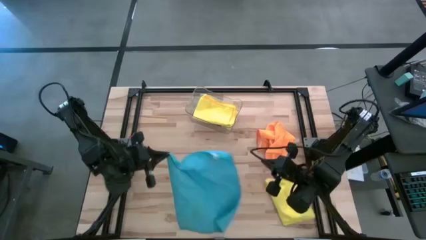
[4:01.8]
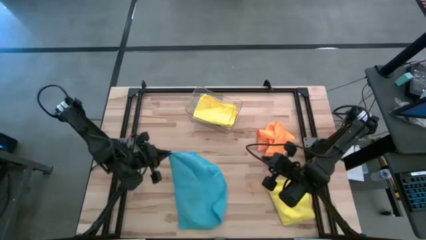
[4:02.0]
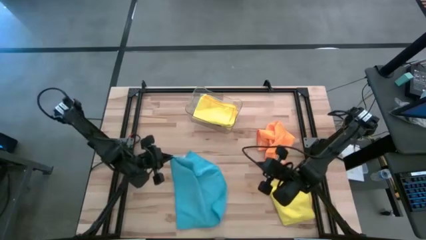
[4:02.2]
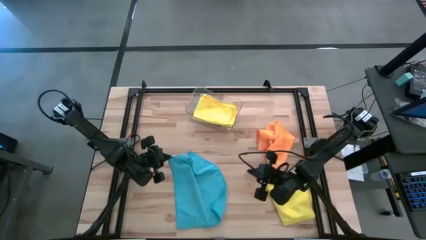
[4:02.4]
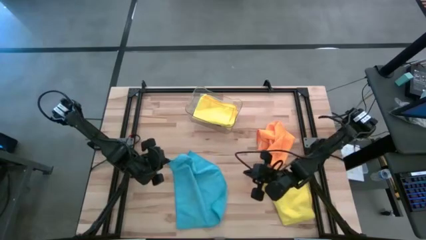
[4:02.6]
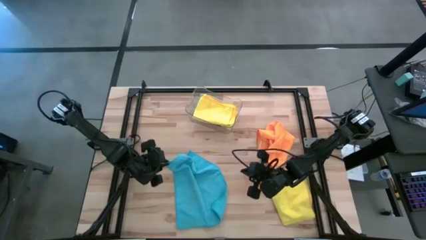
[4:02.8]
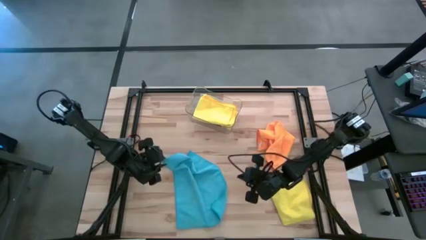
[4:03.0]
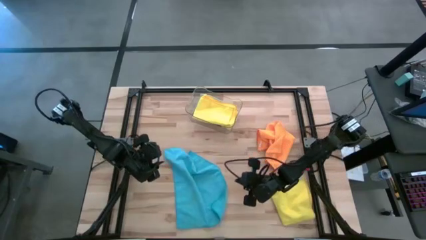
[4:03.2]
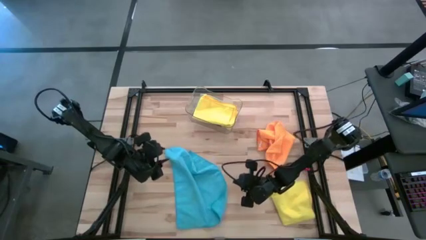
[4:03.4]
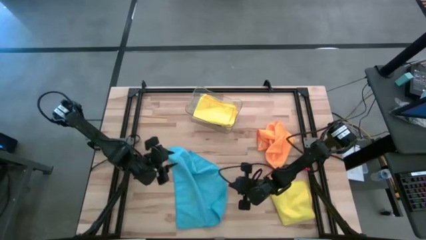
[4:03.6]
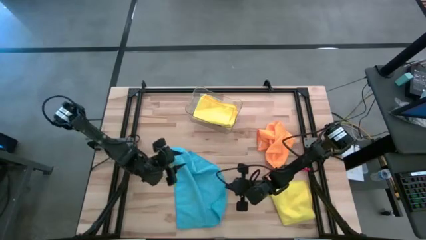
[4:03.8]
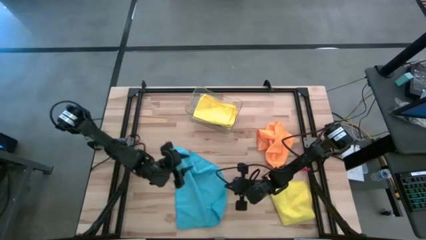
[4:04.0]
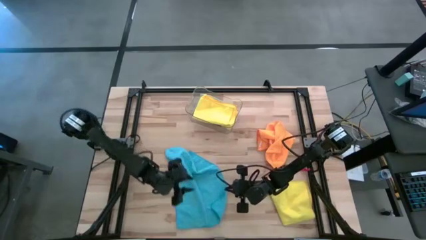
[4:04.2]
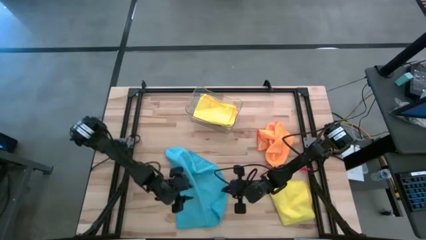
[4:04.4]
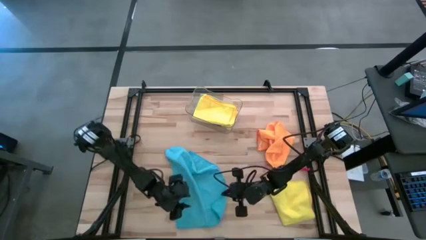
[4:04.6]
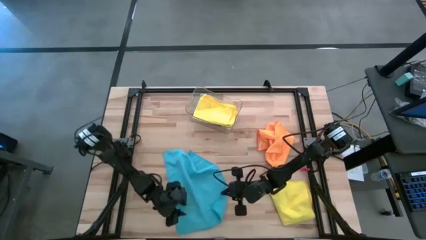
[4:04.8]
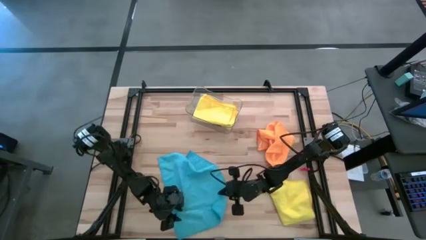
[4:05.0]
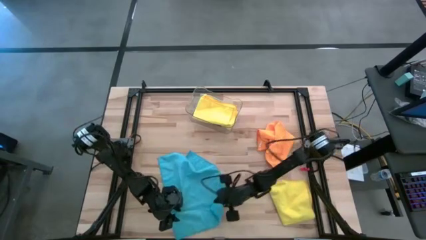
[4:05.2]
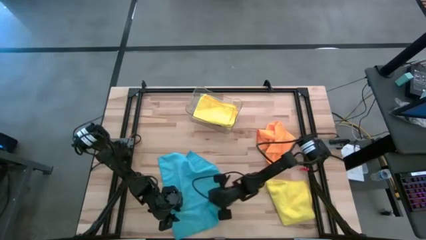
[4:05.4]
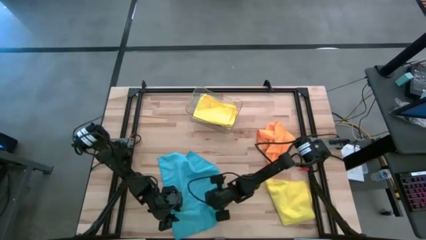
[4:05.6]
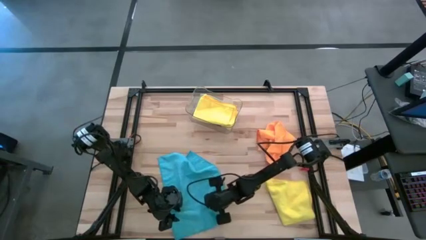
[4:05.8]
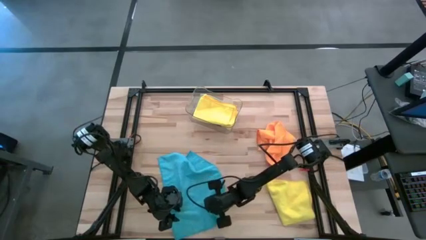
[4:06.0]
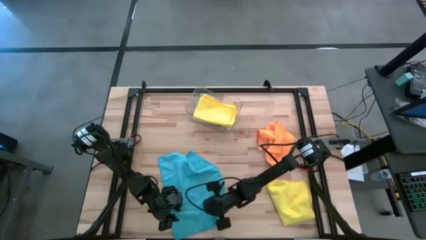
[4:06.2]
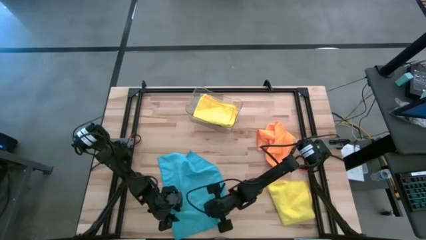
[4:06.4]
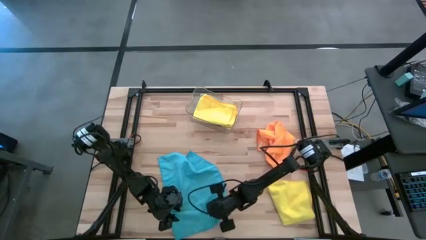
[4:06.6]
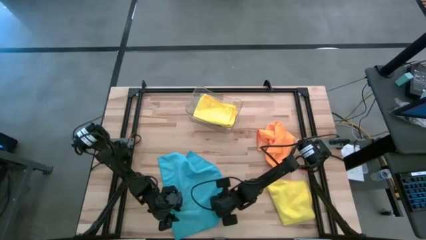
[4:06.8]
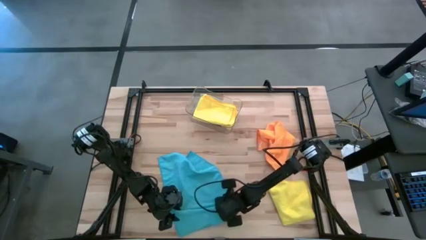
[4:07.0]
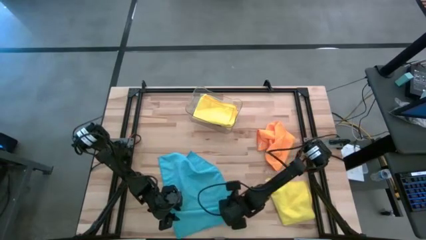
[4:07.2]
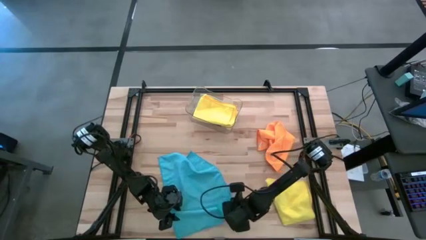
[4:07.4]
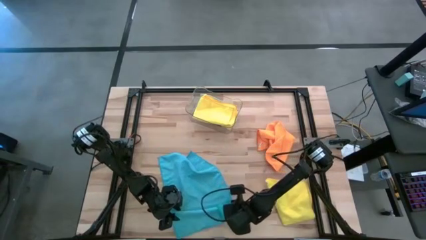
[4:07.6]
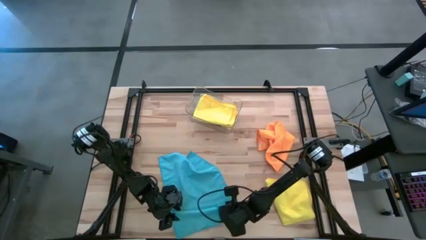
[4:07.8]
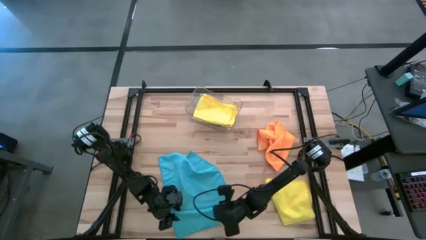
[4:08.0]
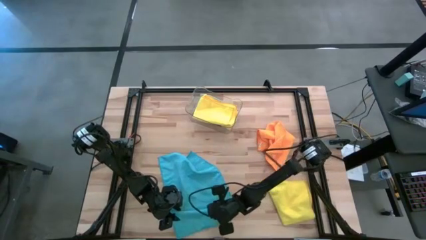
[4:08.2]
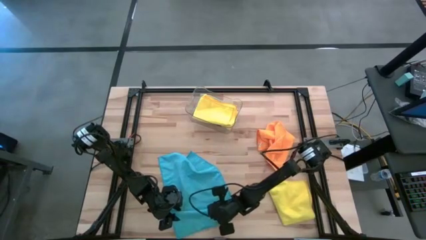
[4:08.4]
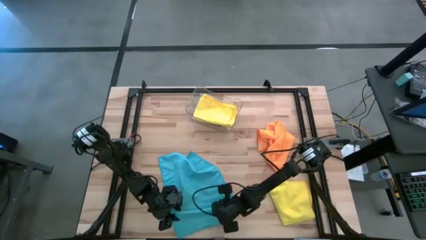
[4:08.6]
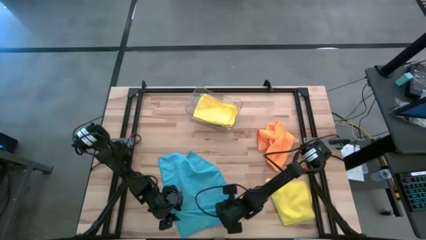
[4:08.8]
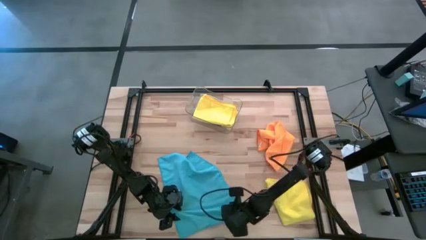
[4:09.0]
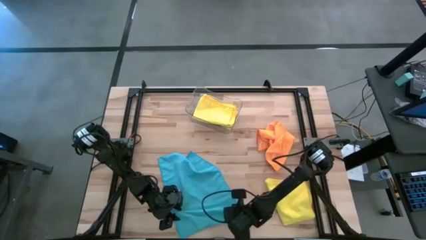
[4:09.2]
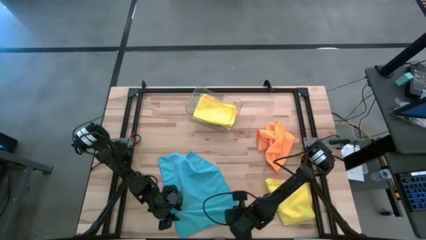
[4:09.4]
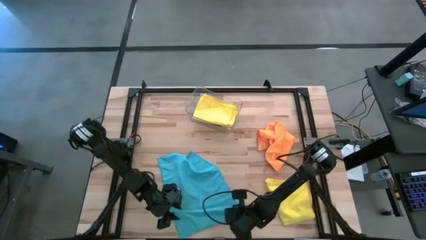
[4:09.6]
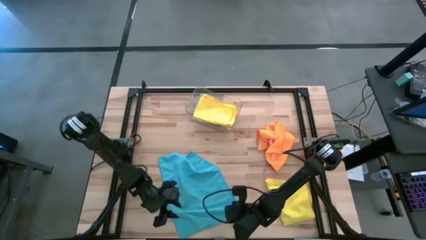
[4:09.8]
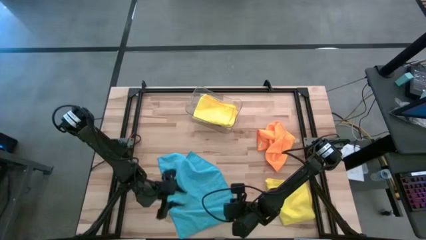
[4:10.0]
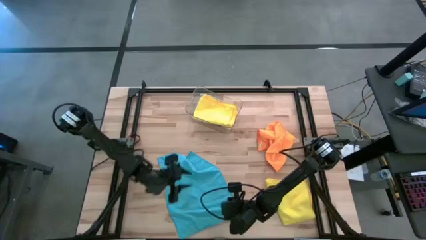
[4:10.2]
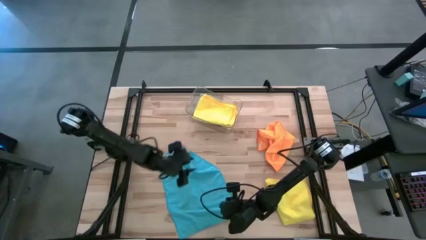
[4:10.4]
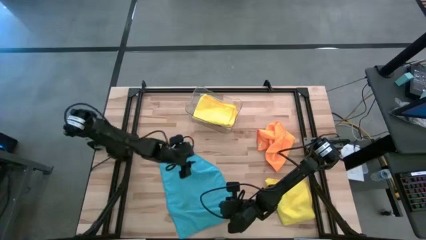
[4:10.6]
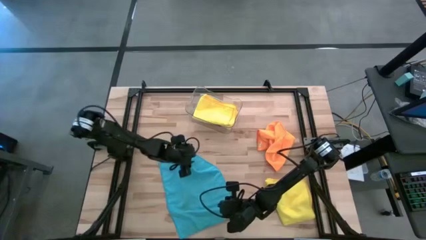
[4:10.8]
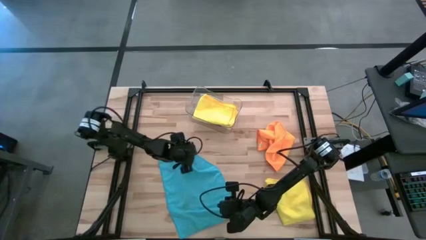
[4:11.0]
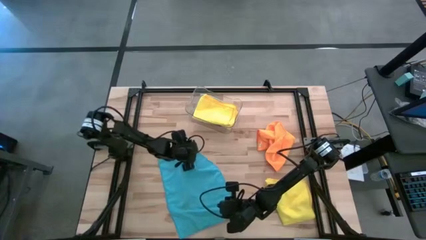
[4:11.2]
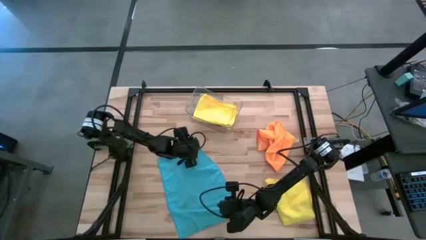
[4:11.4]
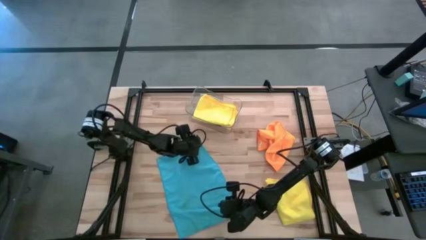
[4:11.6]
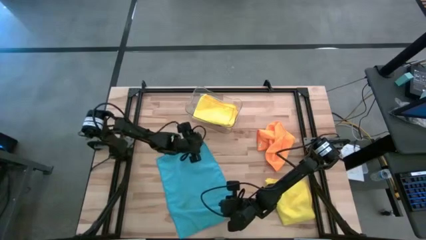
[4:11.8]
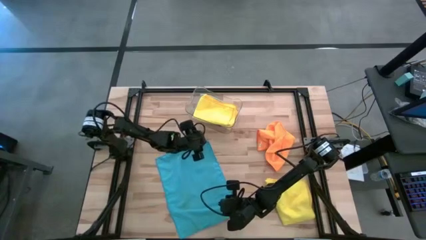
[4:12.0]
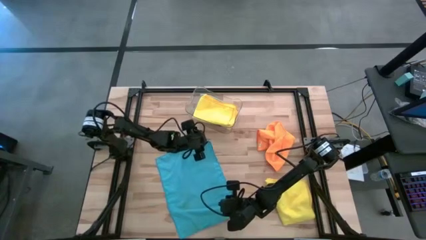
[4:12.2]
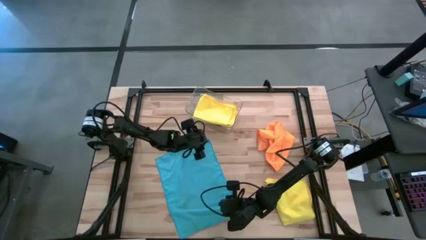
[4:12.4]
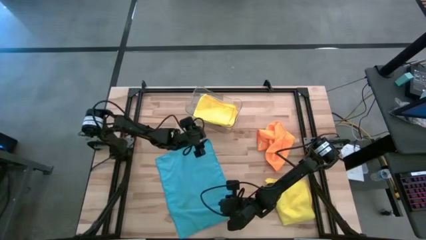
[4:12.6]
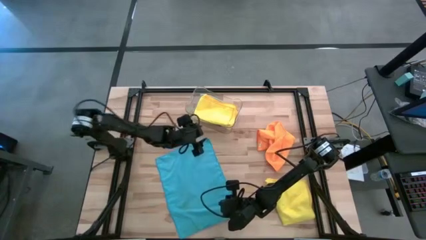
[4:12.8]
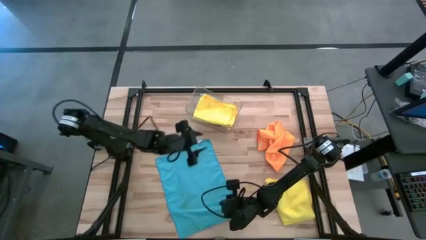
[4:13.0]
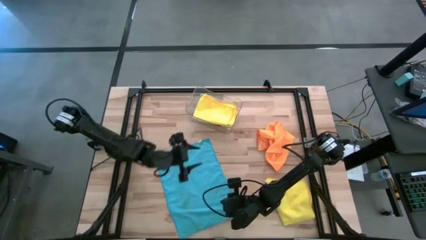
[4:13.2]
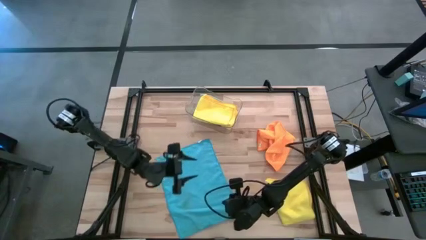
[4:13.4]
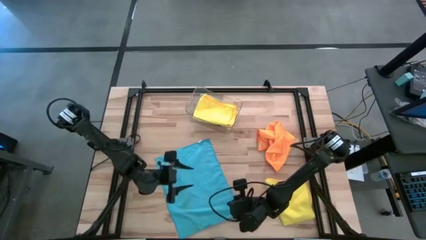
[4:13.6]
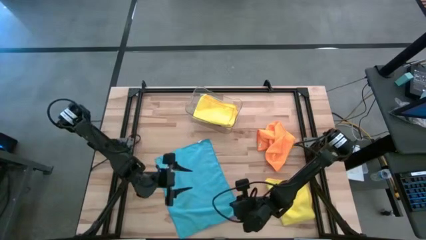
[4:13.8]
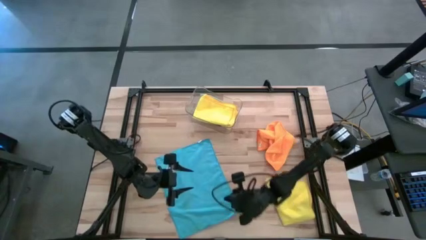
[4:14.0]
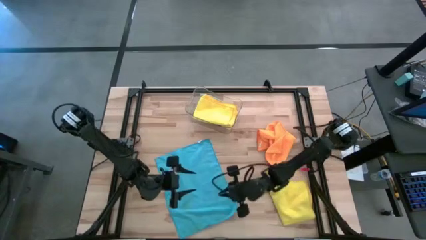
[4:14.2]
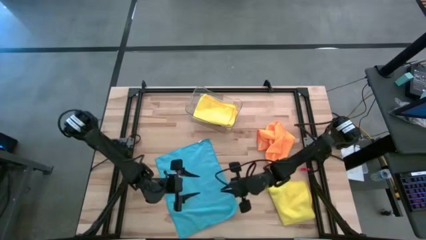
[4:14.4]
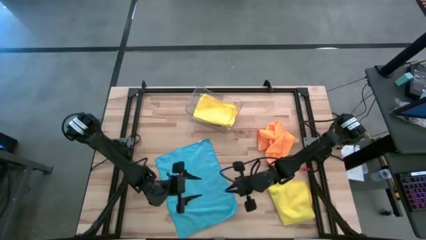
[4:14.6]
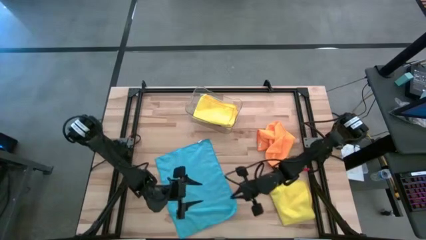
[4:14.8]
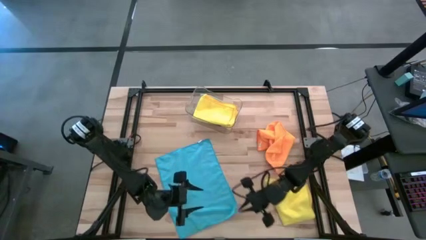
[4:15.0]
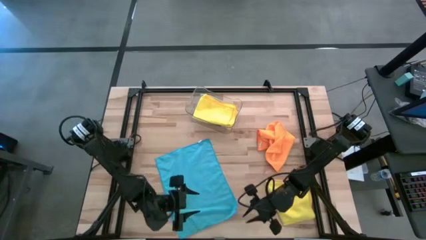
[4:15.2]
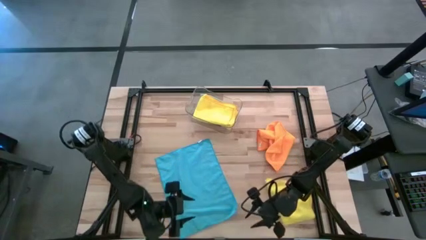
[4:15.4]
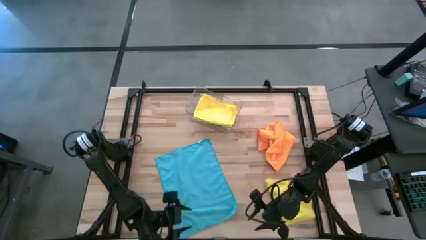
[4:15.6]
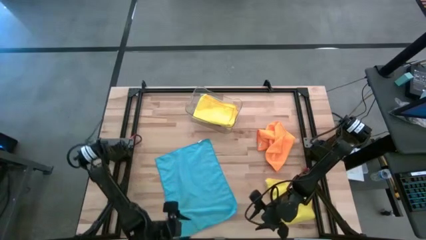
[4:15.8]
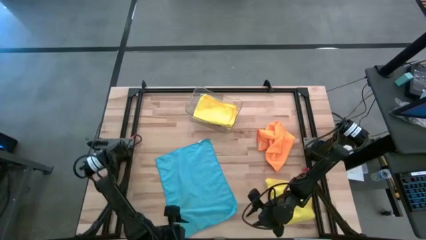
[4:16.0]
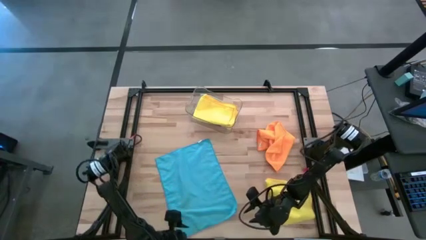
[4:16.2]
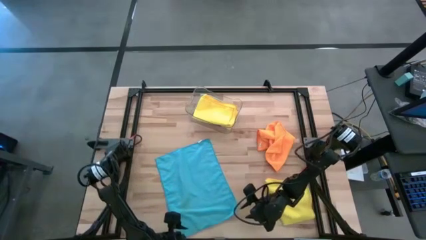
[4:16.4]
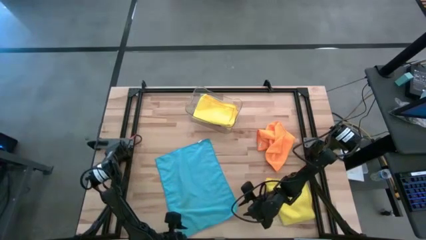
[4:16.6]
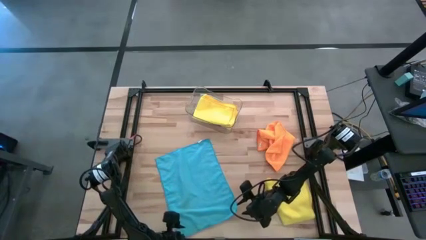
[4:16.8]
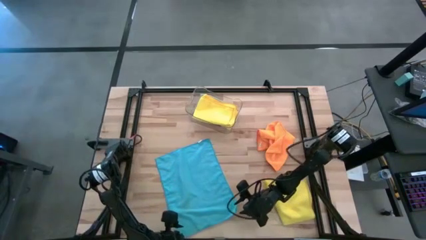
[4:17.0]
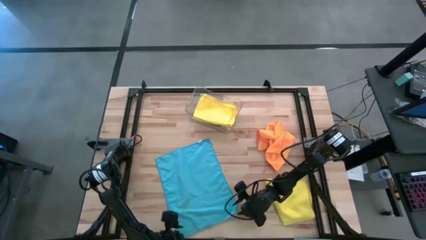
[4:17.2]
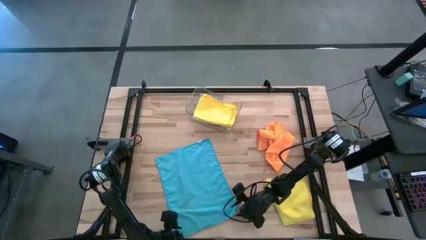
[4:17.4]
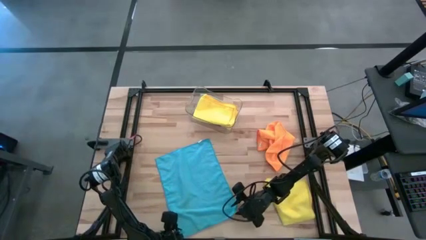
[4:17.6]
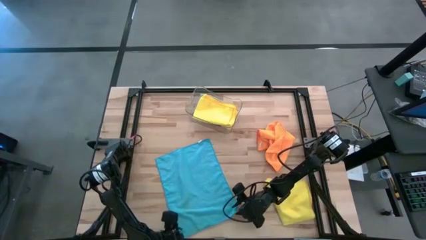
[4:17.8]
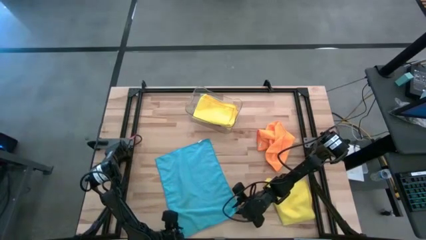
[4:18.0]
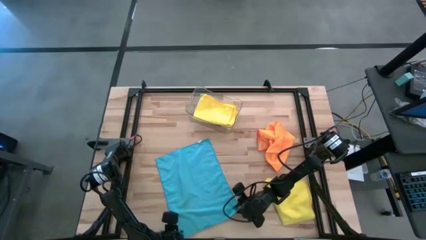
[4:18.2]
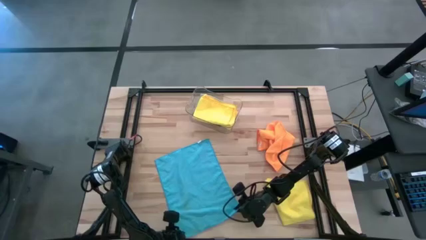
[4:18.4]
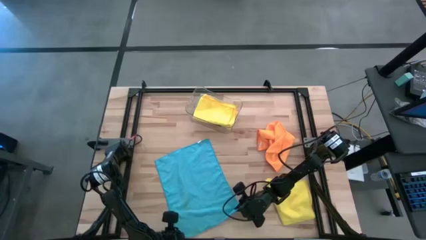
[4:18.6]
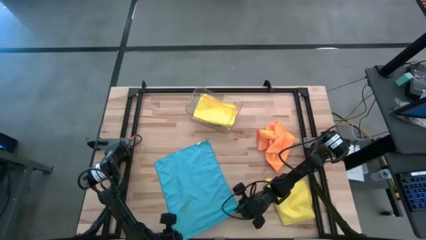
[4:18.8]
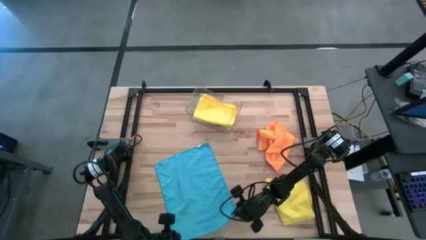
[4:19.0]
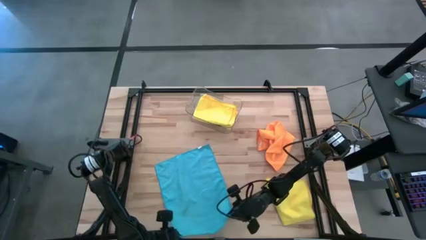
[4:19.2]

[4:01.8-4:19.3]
Task: Fold microfiber towels
Fold the blue microfiber cloth
